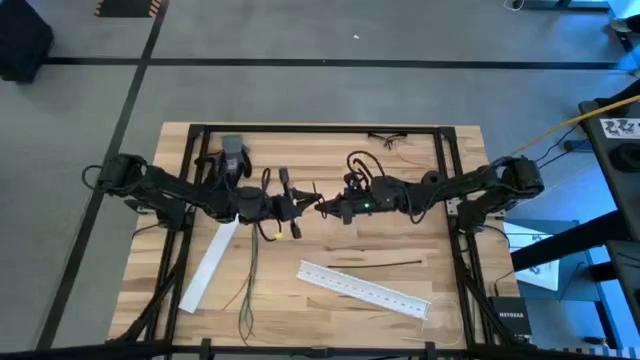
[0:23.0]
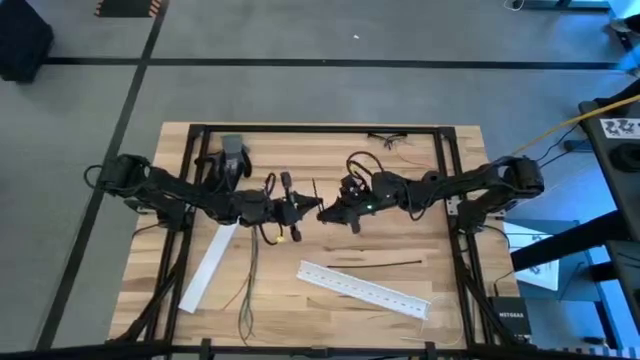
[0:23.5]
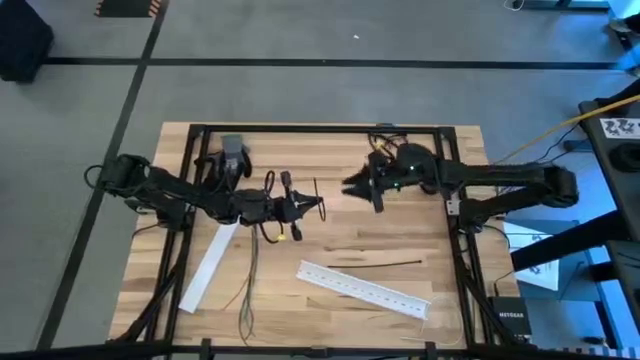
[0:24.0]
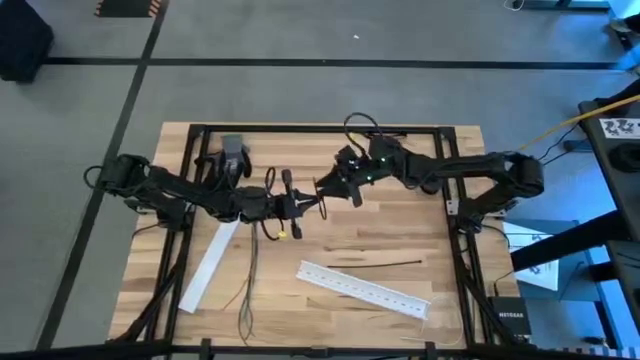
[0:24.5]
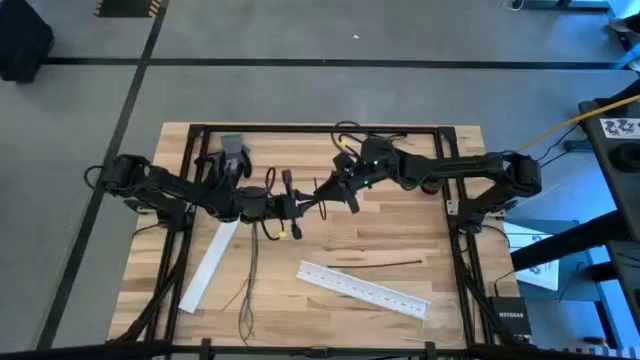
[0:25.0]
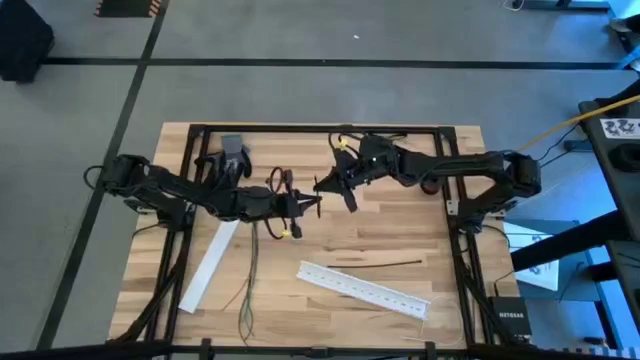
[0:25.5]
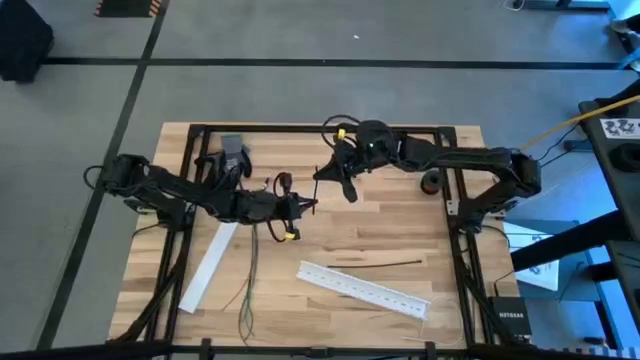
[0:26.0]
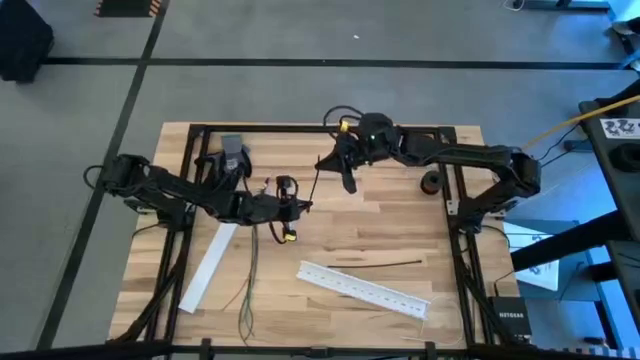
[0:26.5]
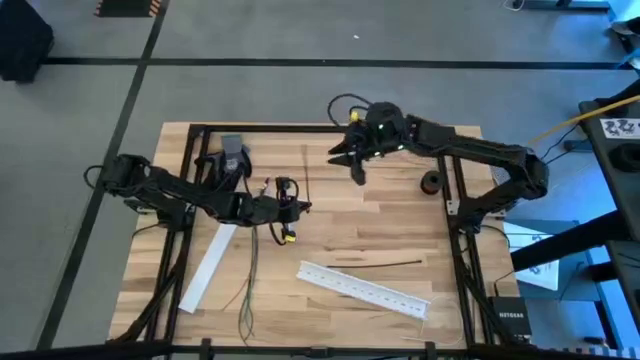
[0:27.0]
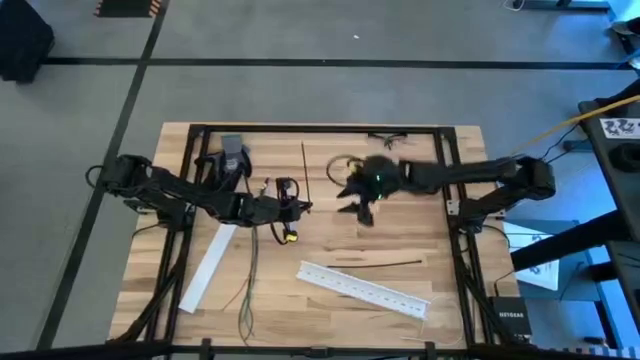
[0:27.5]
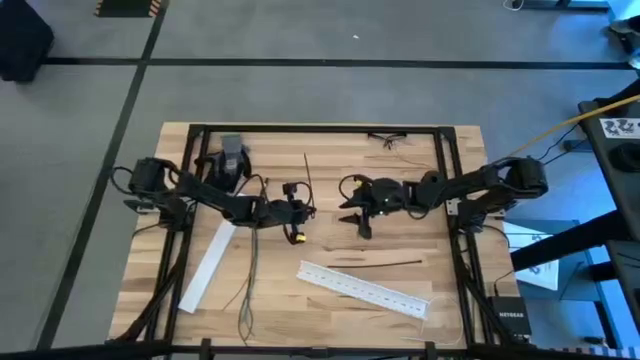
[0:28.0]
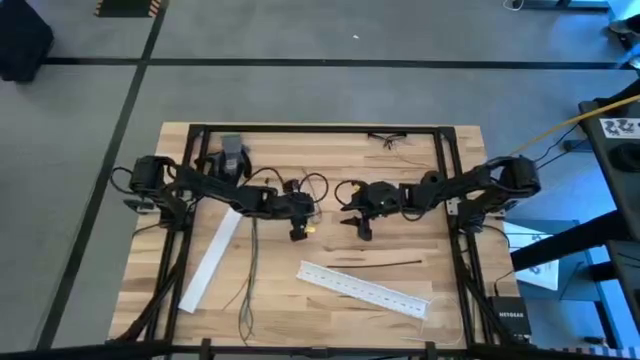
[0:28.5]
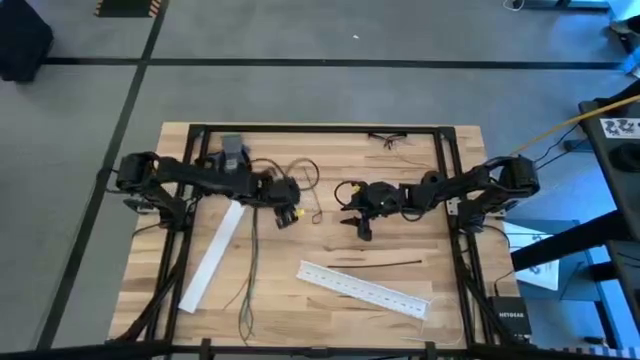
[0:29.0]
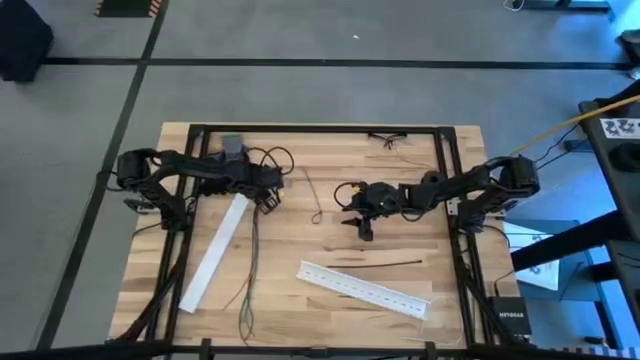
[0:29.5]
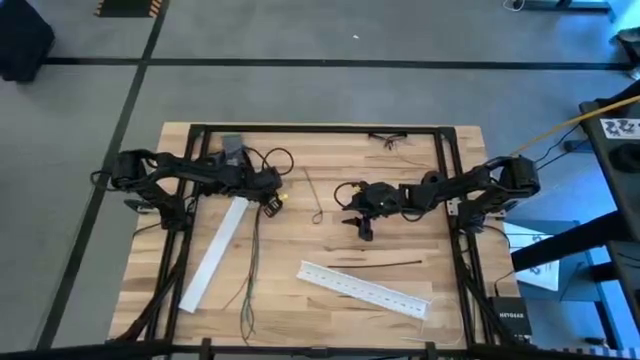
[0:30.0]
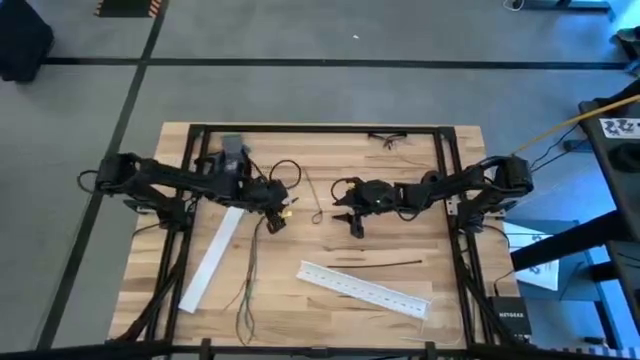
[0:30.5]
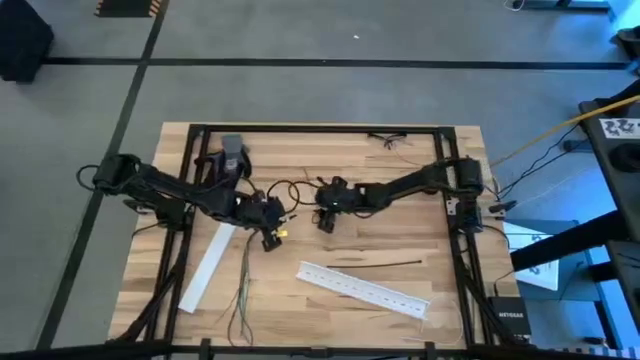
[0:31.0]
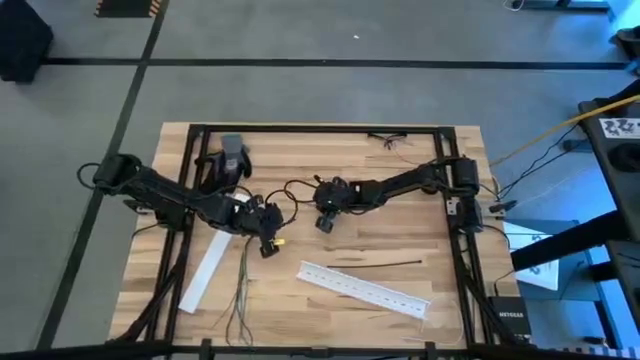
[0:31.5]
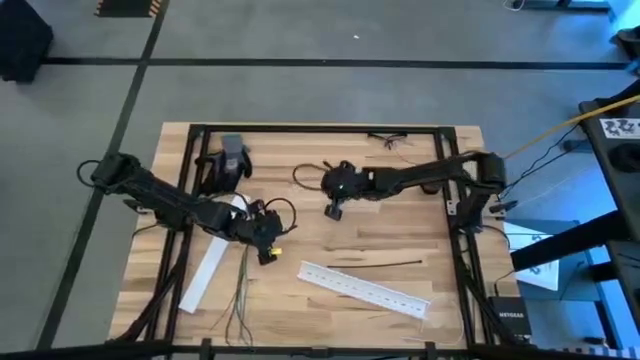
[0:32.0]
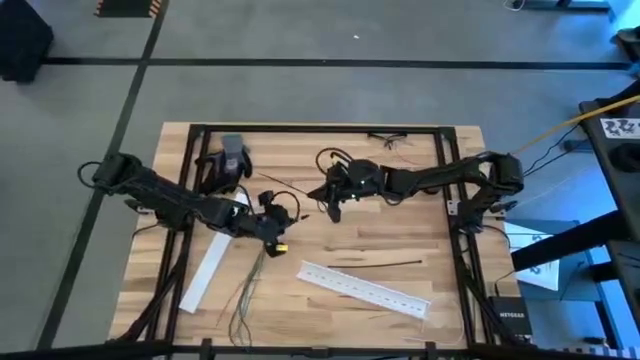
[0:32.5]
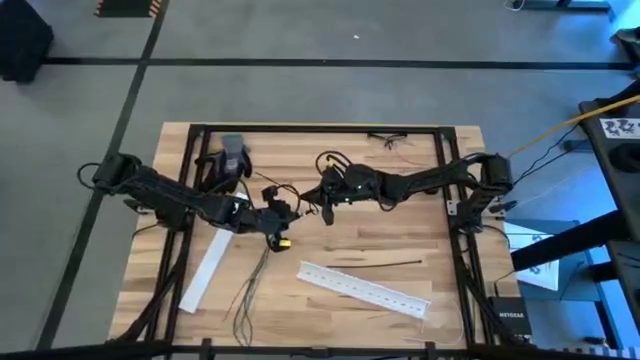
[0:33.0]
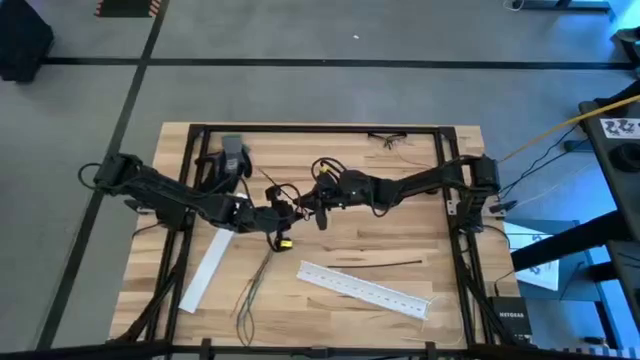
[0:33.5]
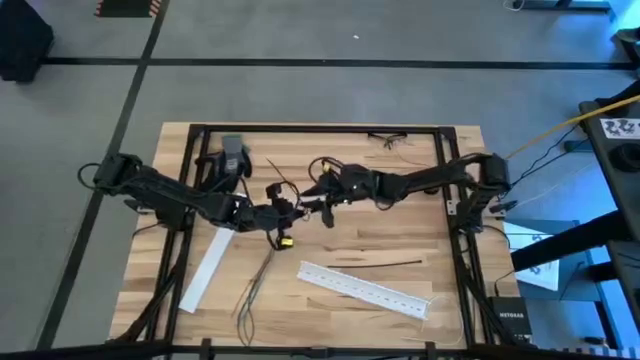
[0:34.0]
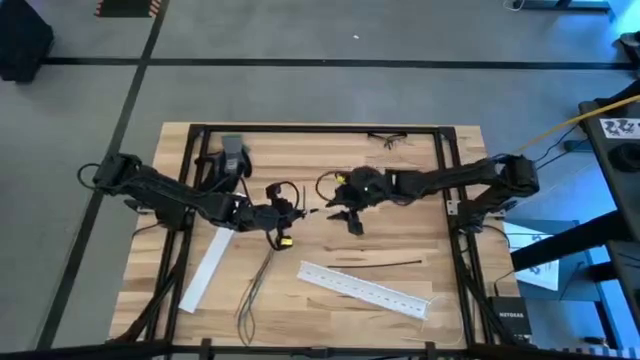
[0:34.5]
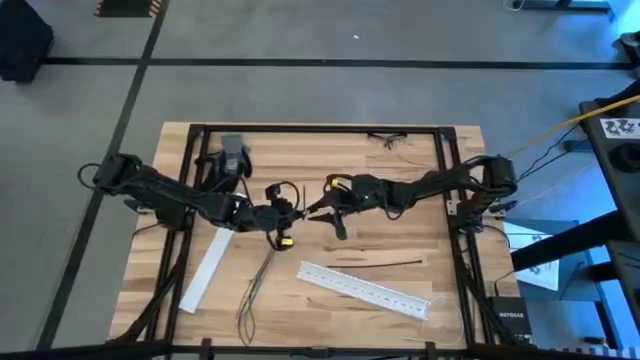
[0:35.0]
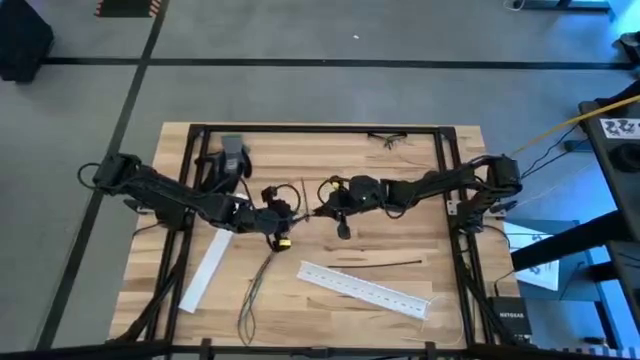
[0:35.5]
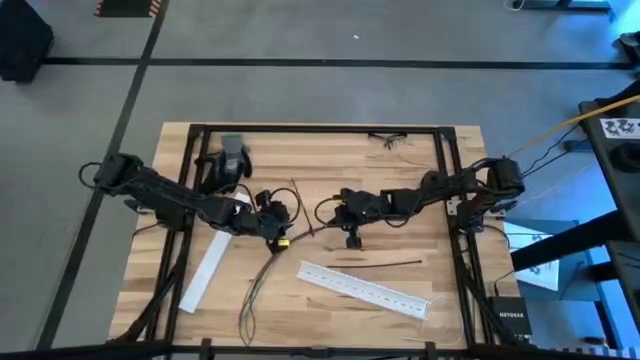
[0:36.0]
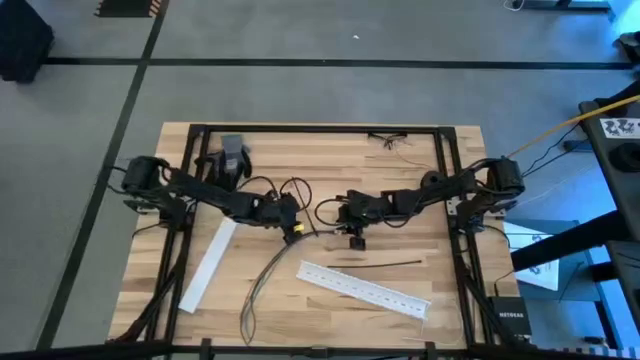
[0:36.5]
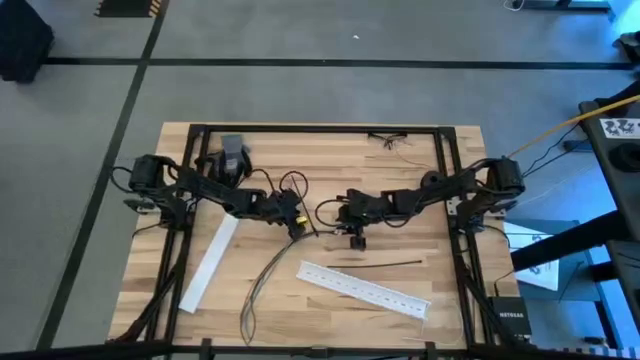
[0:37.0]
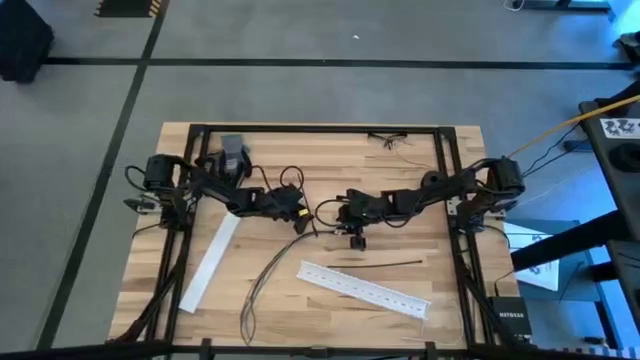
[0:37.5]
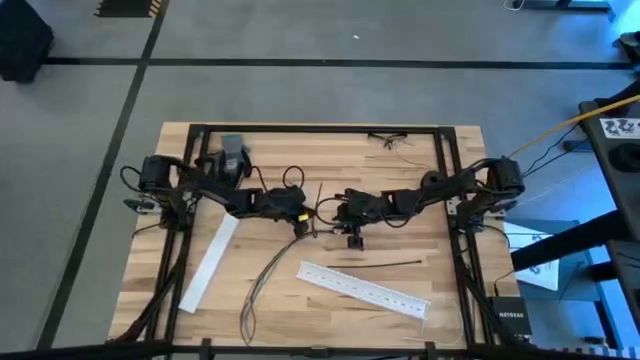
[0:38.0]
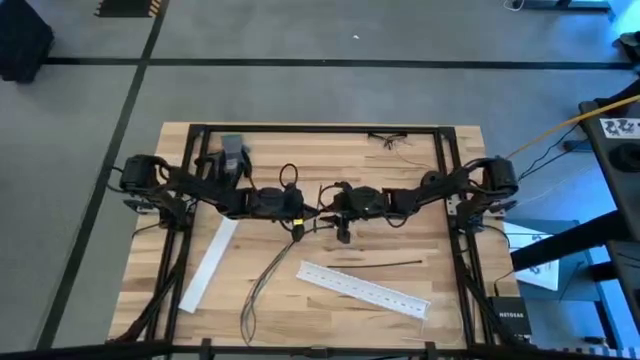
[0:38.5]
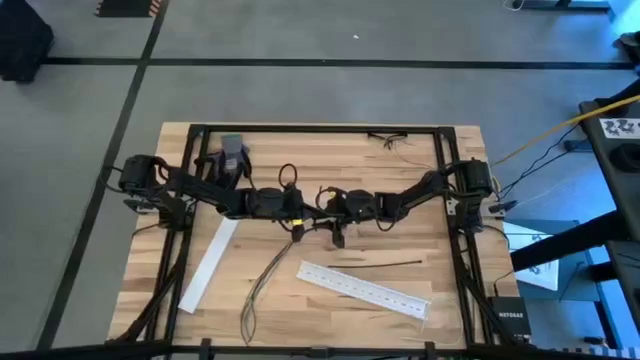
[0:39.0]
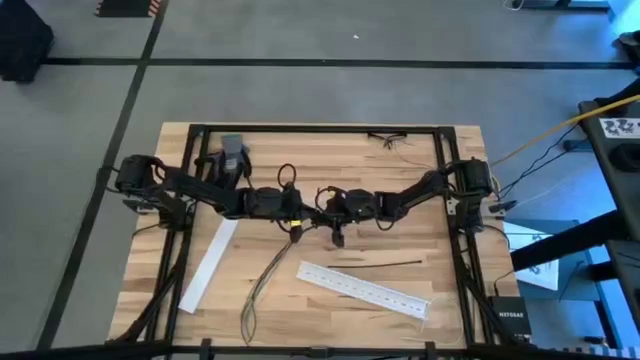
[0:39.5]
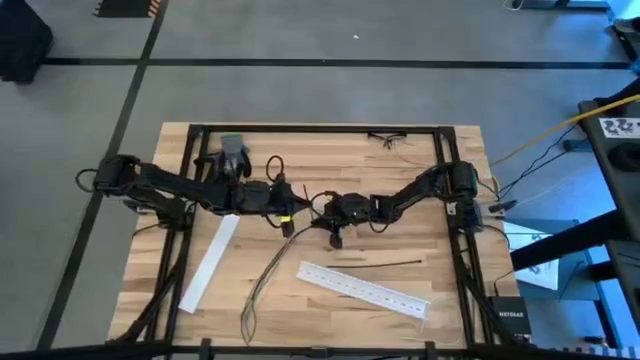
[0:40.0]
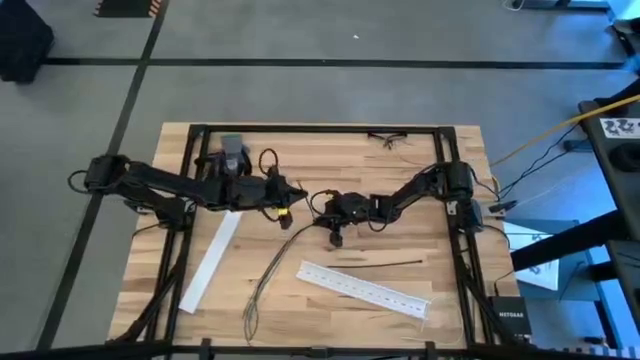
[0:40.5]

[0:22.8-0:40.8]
Task: Ziptie cables
Wrap the cables together using the top zip tie

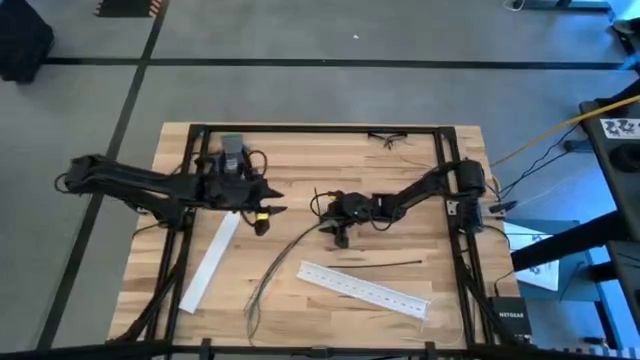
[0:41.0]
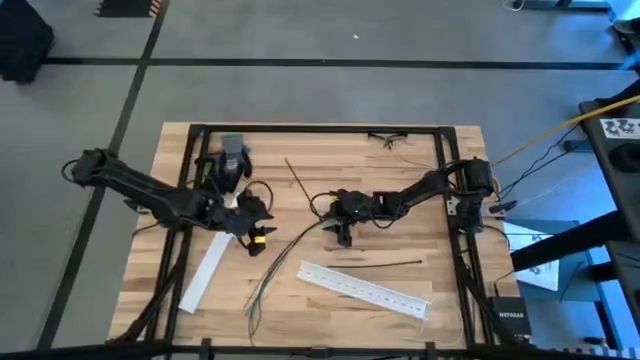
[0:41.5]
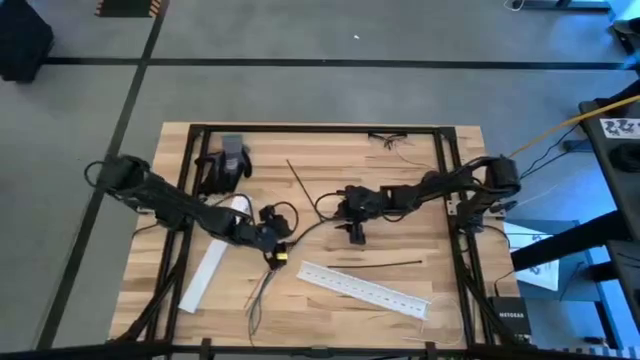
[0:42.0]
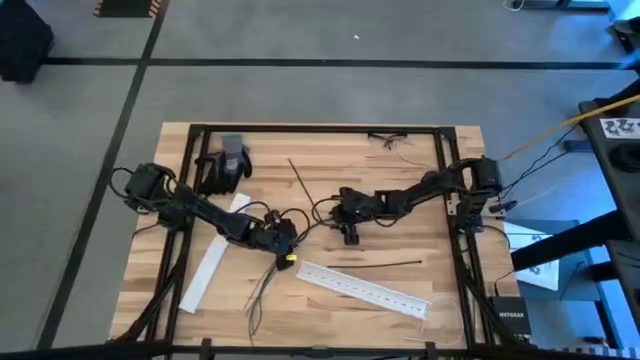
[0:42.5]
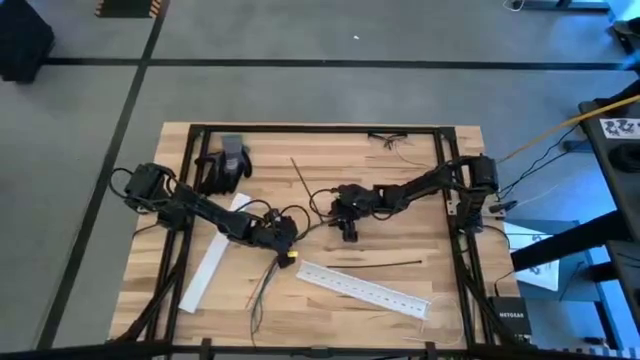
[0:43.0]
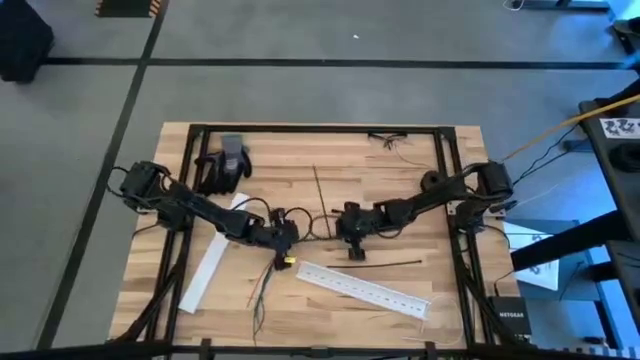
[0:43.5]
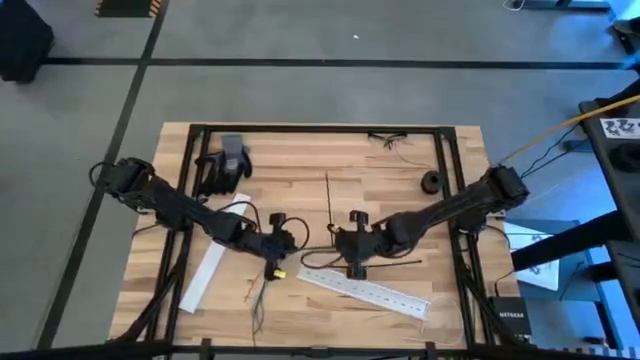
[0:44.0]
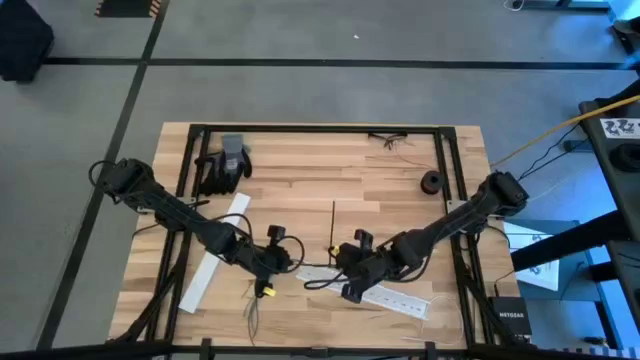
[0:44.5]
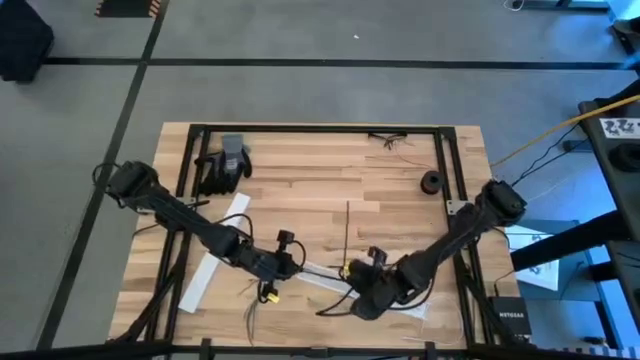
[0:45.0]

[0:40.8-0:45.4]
Wrap the cables together using the top zip tie
